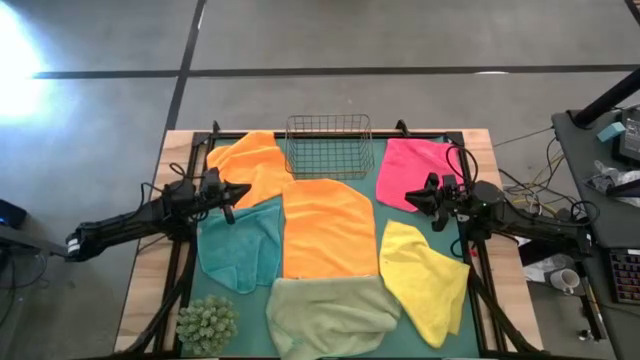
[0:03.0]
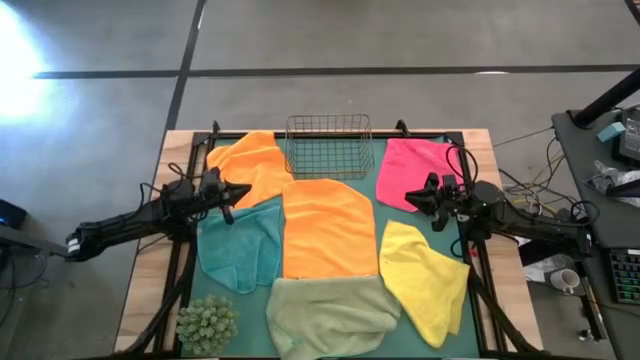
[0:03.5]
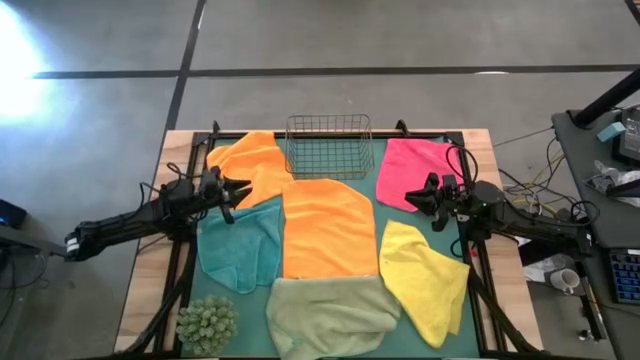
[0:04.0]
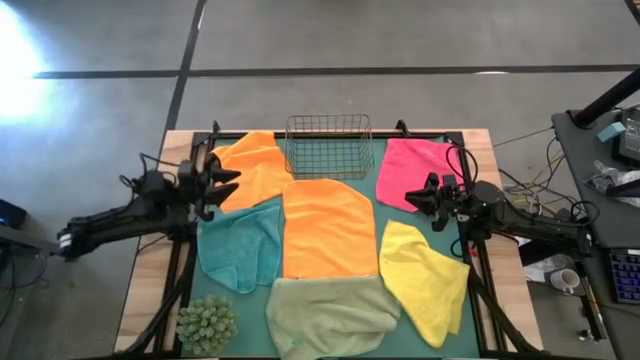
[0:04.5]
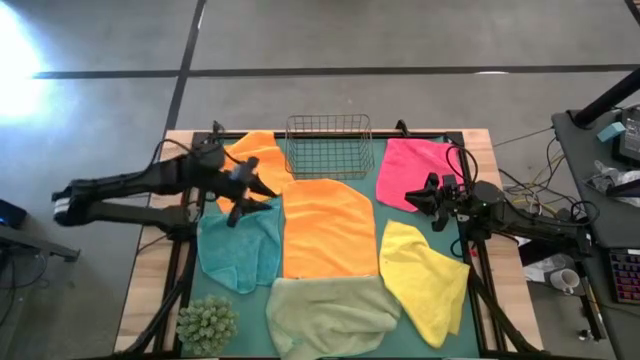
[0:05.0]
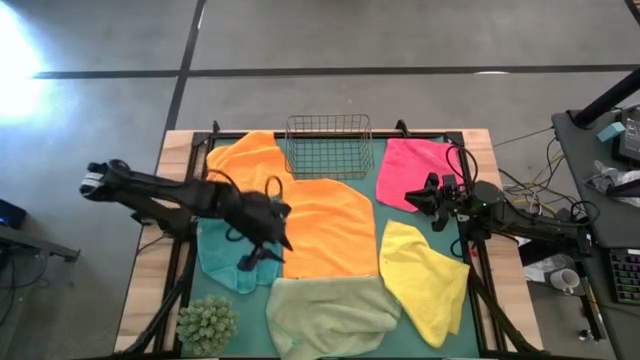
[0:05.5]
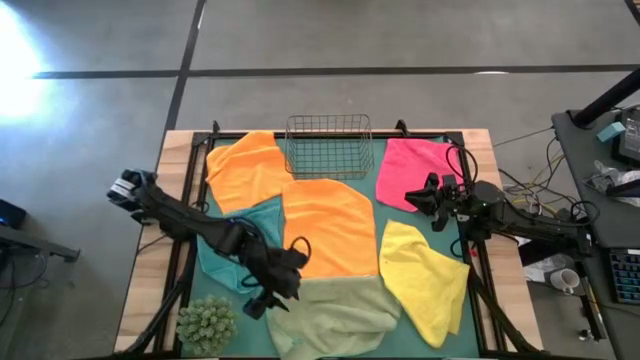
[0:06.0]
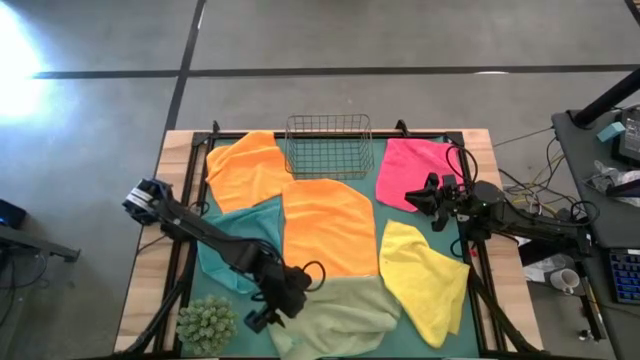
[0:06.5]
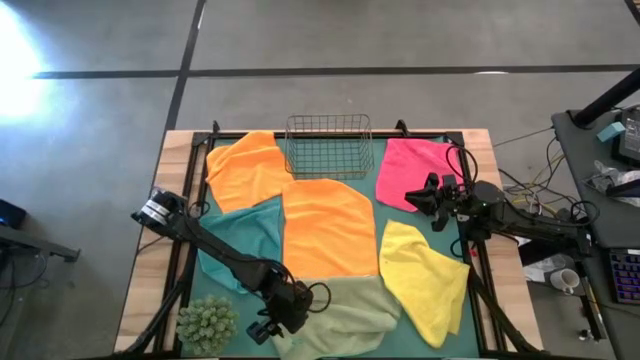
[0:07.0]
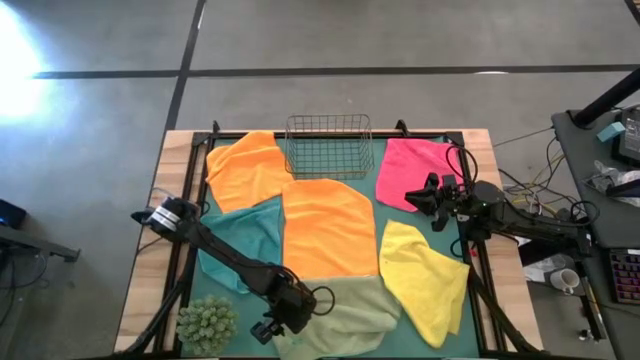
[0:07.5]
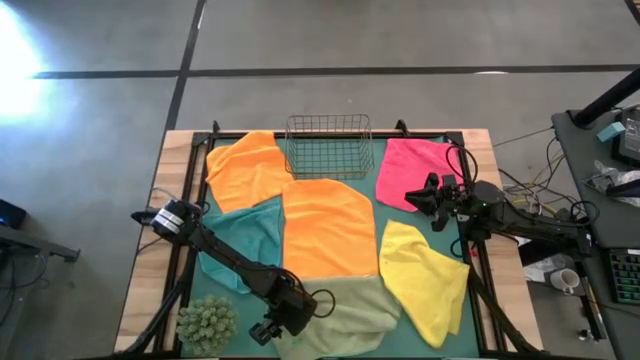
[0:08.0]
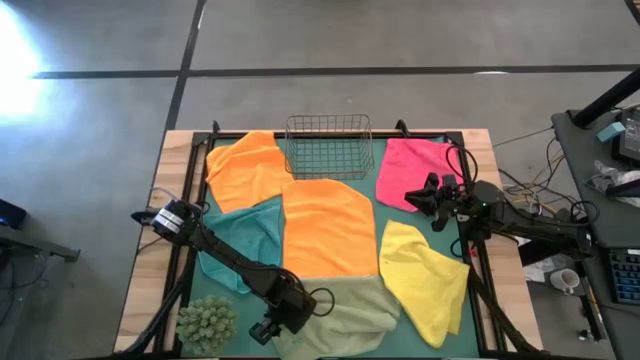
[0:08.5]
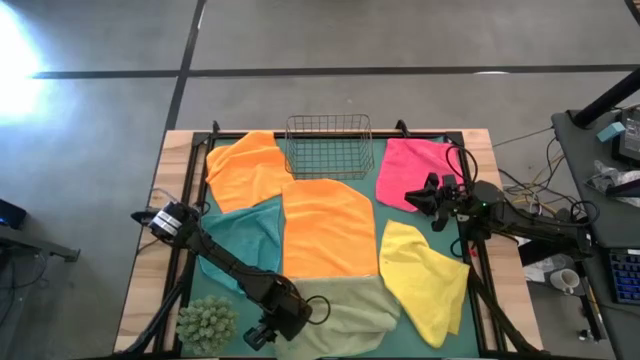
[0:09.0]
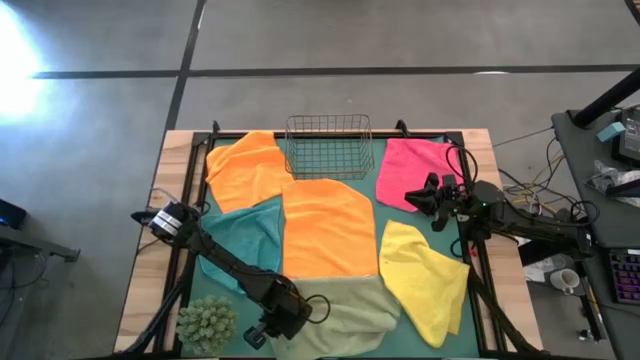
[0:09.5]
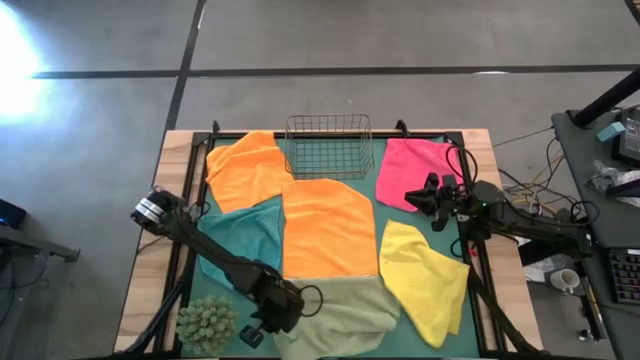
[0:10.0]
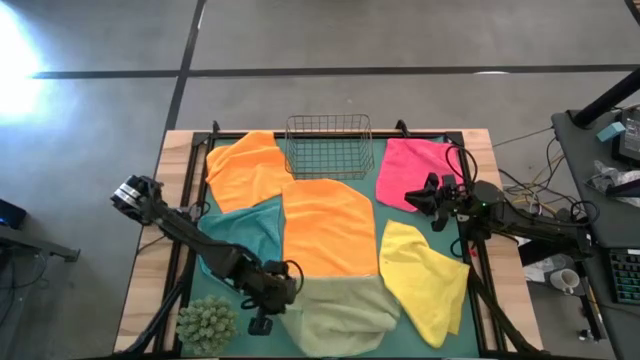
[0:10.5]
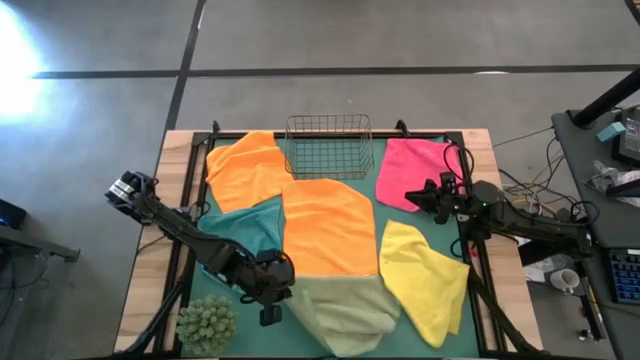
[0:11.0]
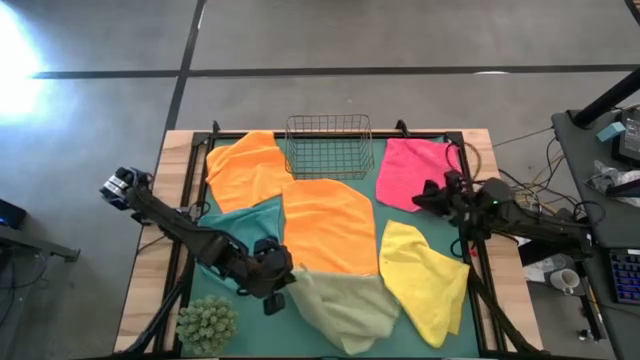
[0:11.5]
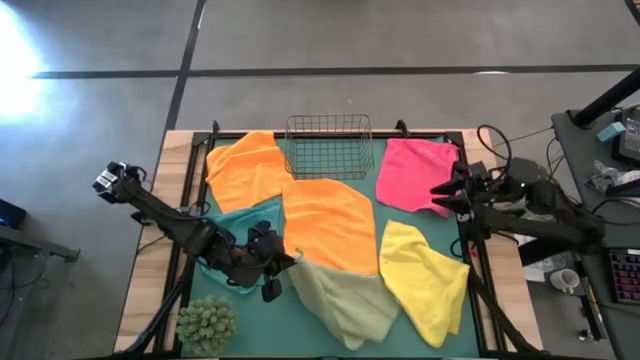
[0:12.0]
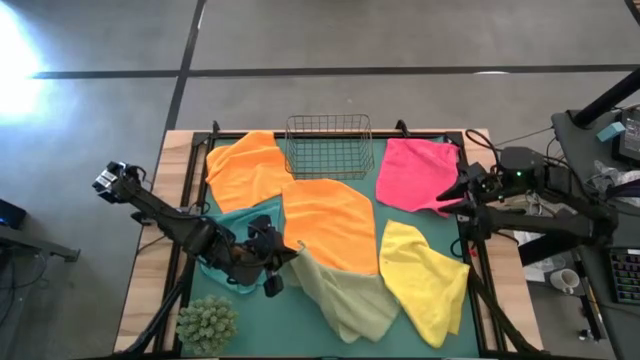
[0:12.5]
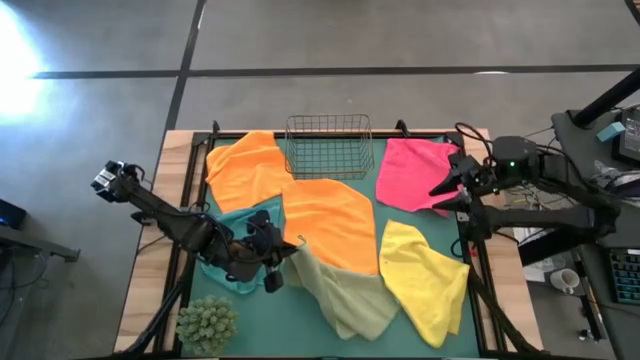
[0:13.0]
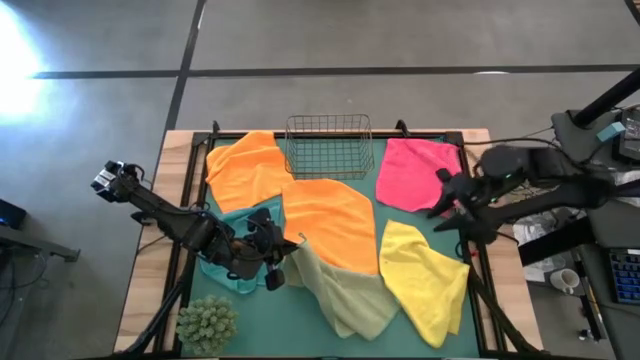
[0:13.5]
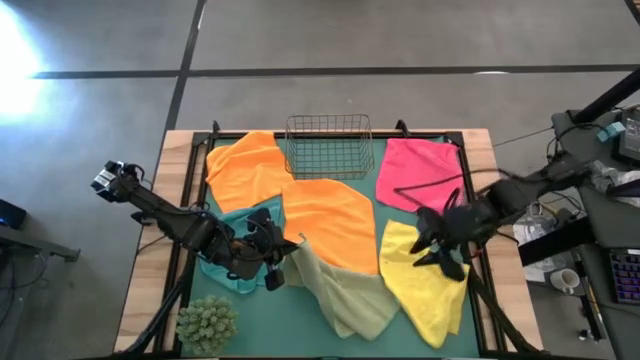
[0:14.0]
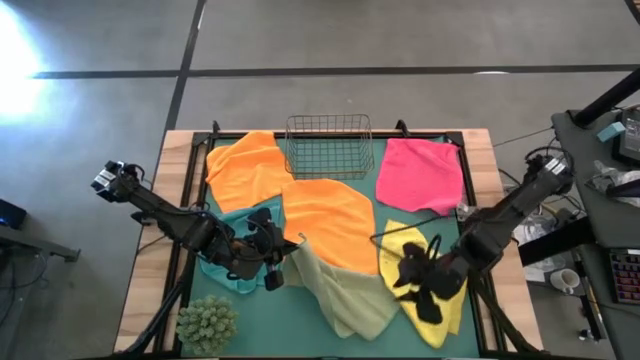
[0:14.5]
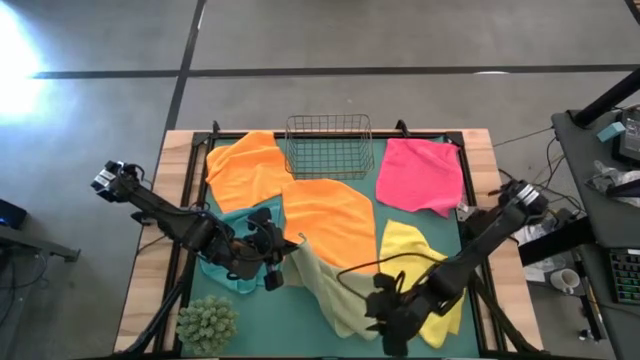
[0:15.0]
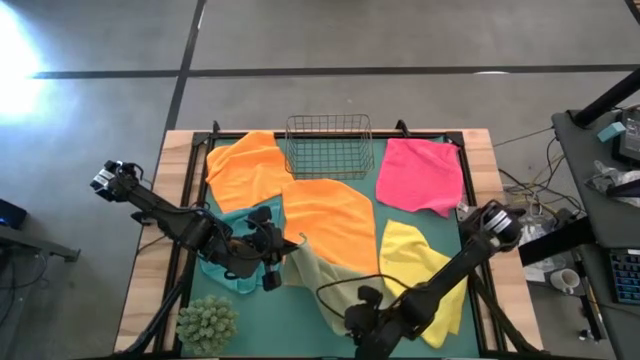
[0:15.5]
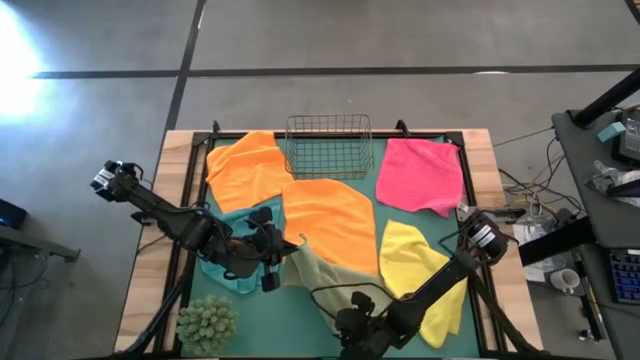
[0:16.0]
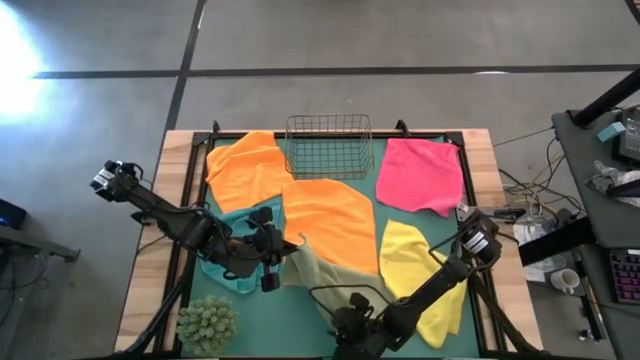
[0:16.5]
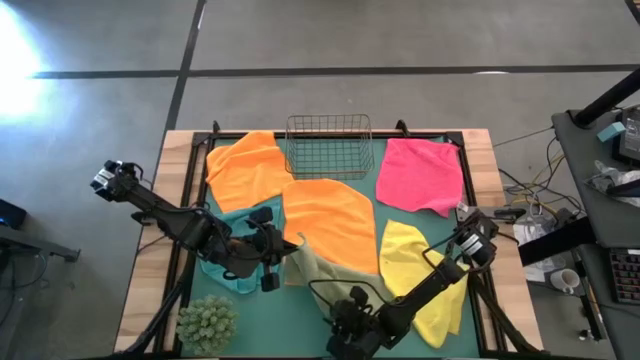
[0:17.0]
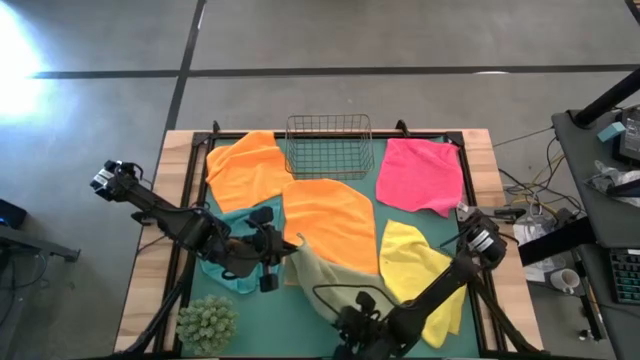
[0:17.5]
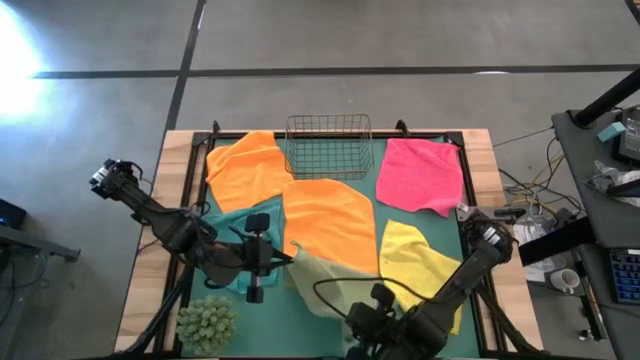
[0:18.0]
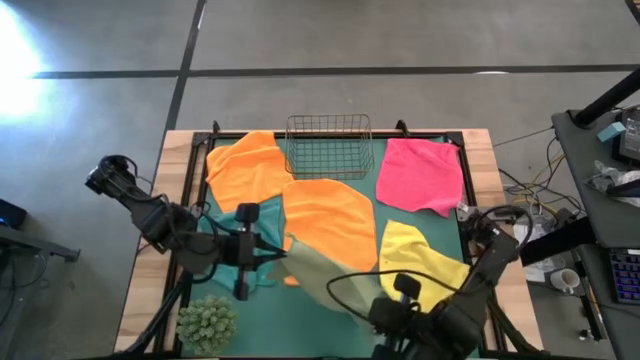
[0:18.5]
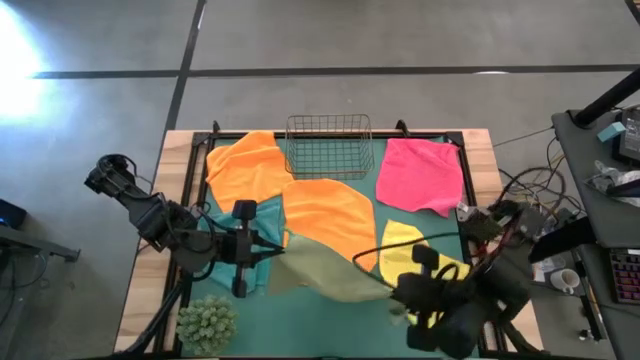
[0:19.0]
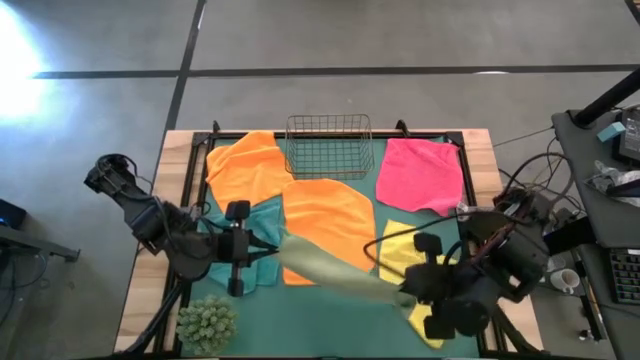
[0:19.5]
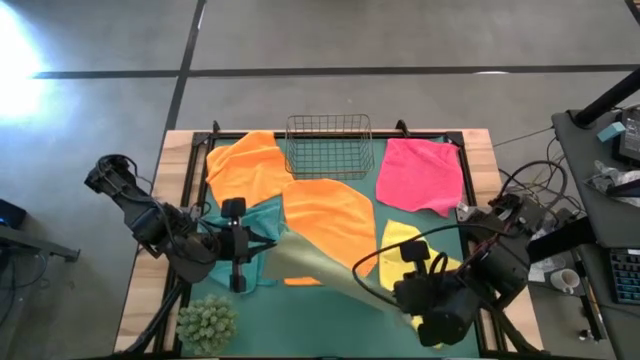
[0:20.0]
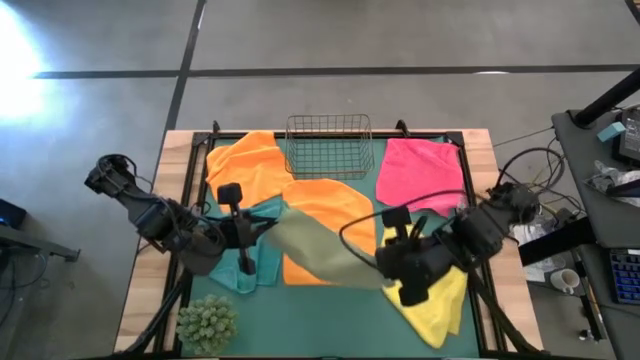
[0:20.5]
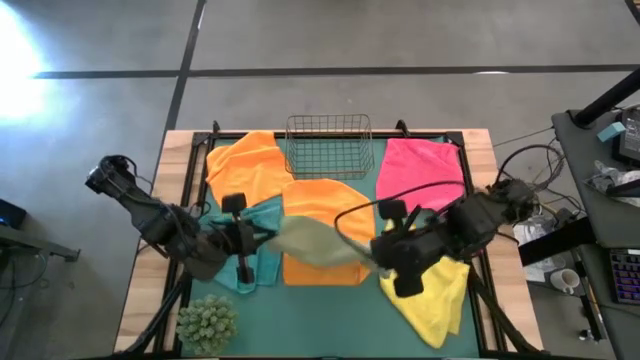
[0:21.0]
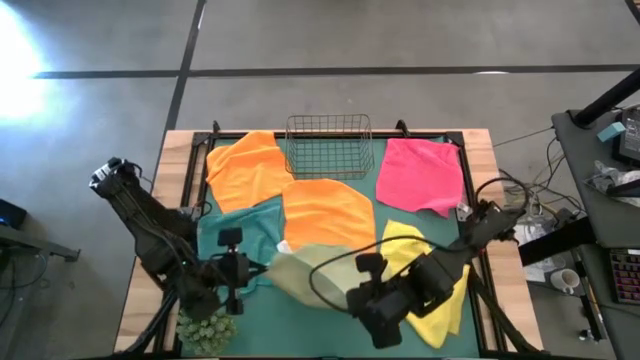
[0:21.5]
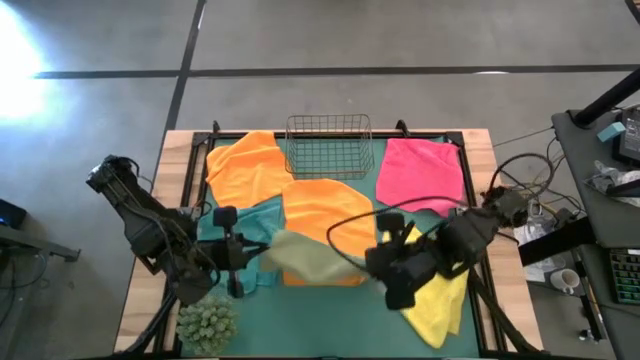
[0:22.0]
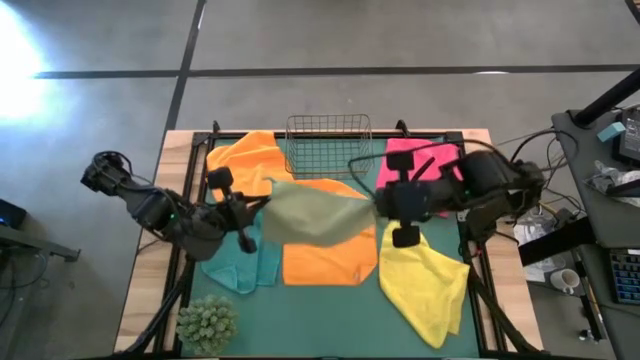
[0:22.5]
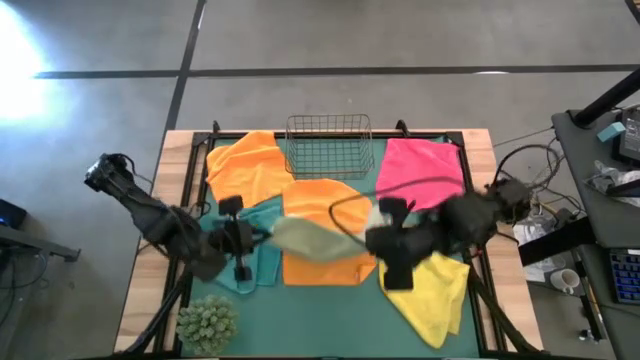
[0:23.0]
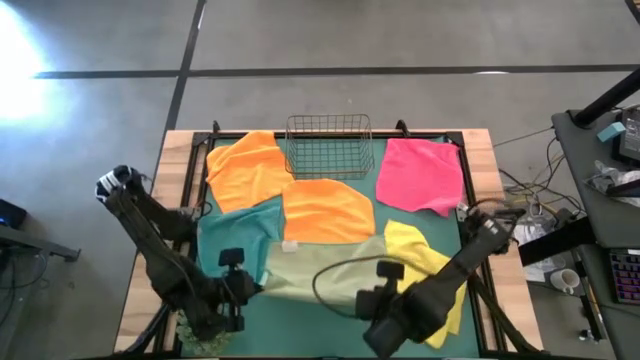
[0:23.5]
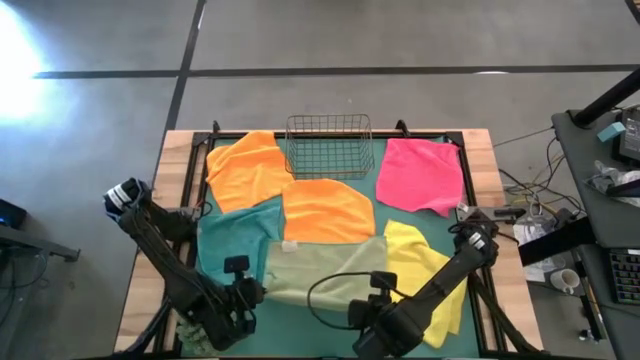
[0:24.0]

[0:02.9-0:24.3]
Task: Fold microfiber towels
Fold the light green microfiber cloth
